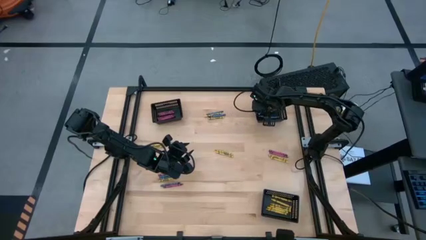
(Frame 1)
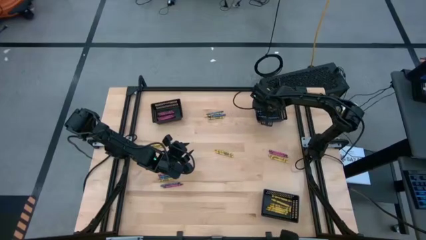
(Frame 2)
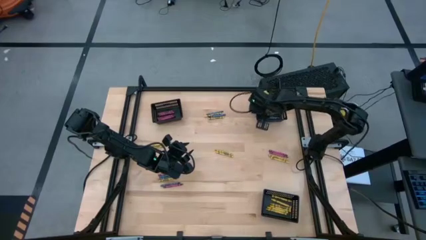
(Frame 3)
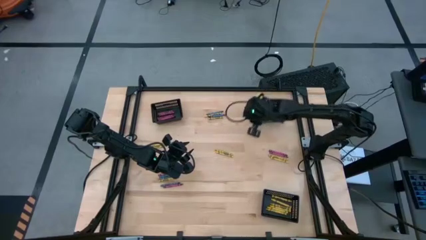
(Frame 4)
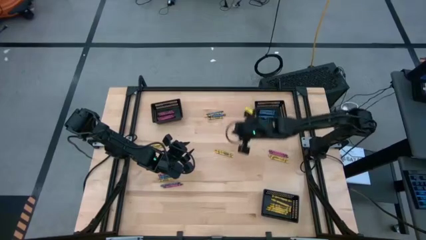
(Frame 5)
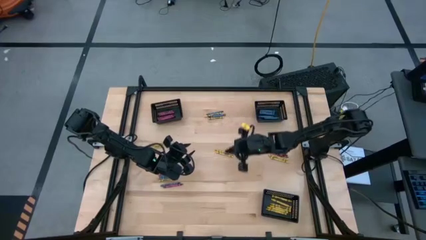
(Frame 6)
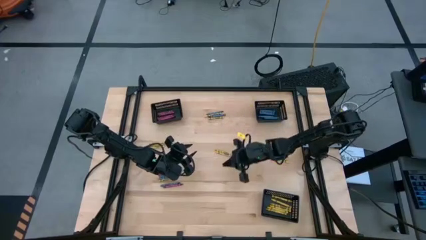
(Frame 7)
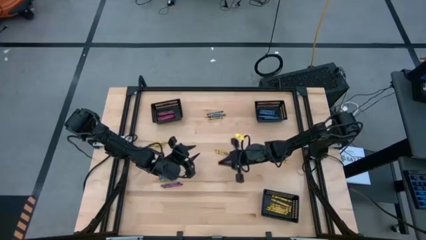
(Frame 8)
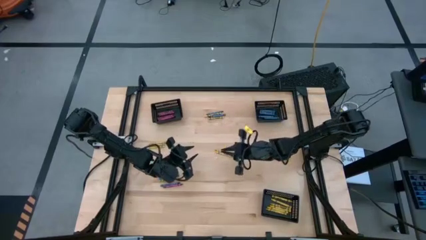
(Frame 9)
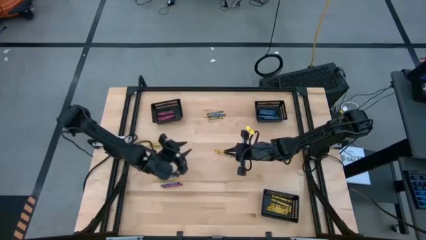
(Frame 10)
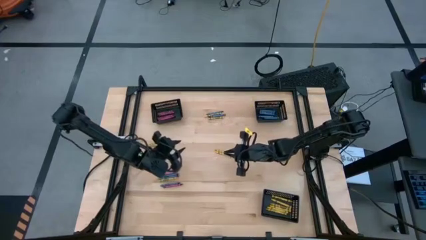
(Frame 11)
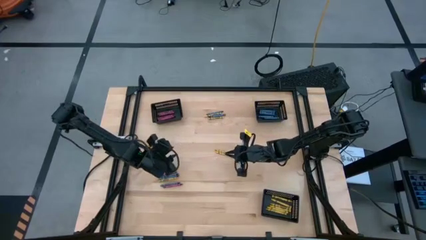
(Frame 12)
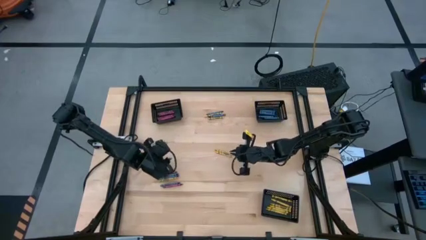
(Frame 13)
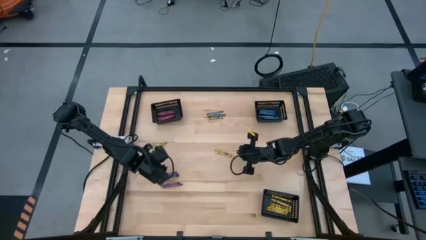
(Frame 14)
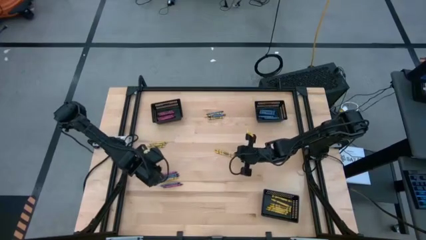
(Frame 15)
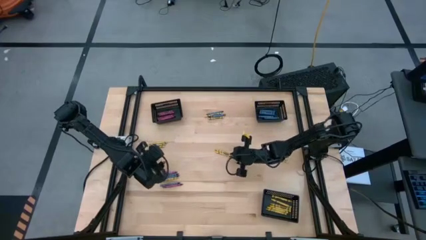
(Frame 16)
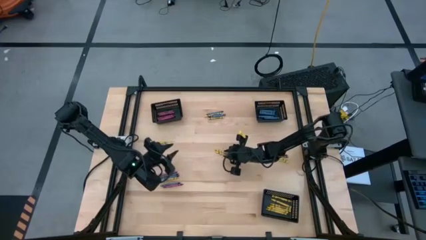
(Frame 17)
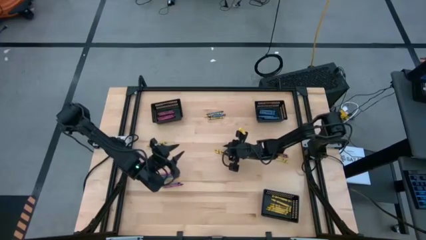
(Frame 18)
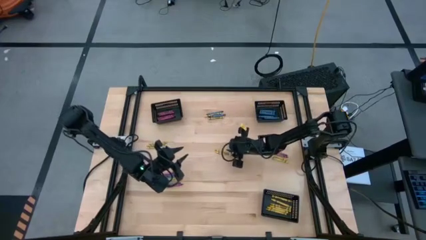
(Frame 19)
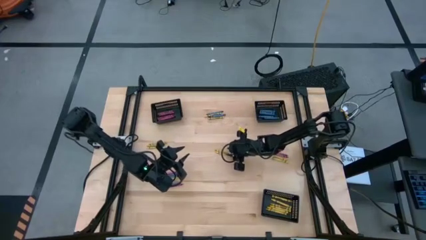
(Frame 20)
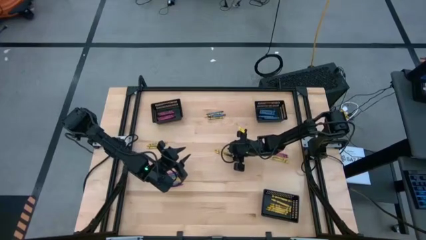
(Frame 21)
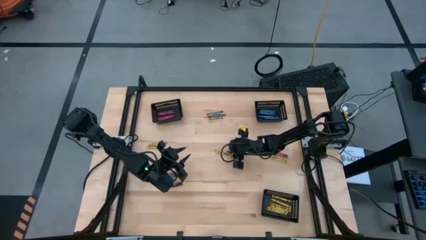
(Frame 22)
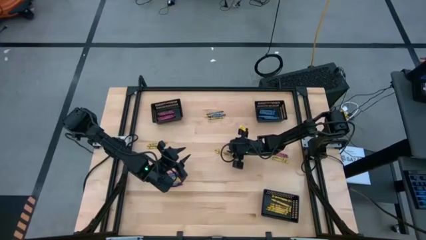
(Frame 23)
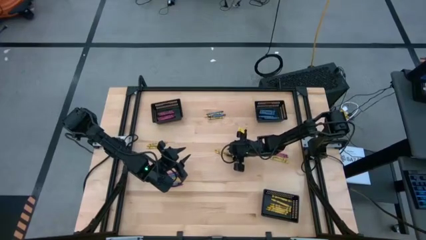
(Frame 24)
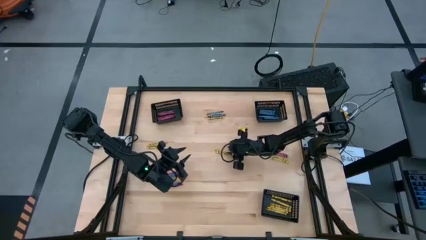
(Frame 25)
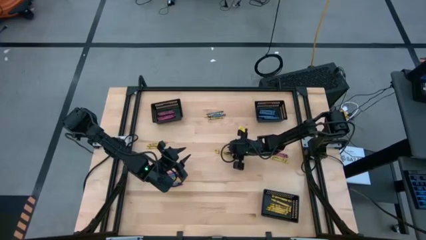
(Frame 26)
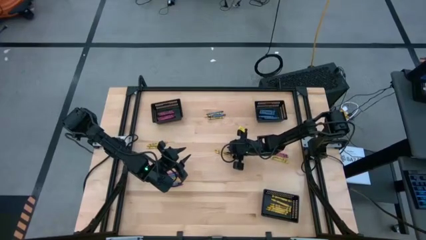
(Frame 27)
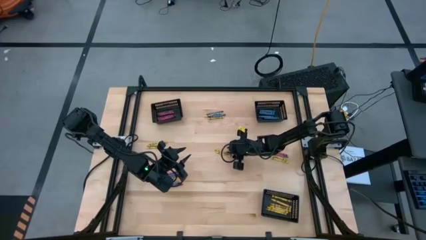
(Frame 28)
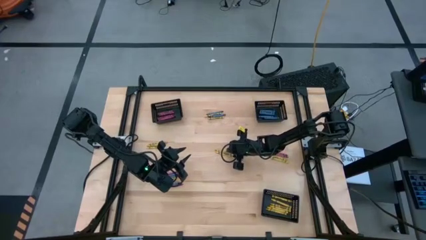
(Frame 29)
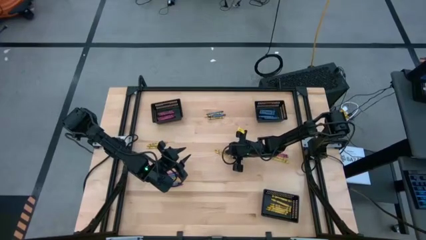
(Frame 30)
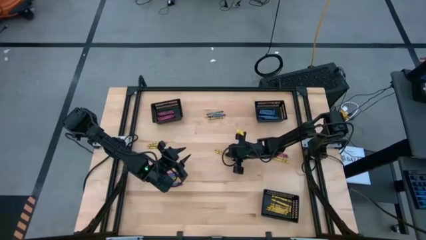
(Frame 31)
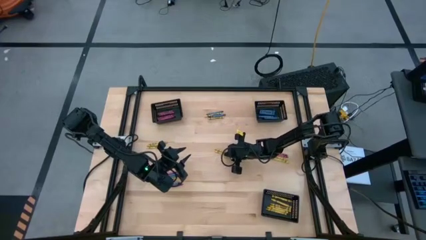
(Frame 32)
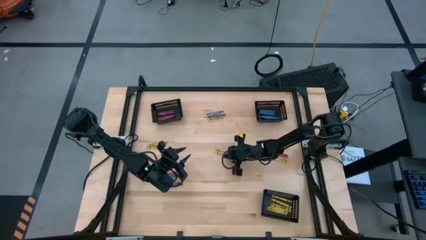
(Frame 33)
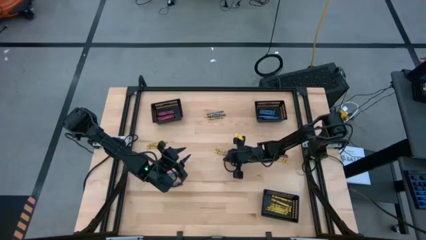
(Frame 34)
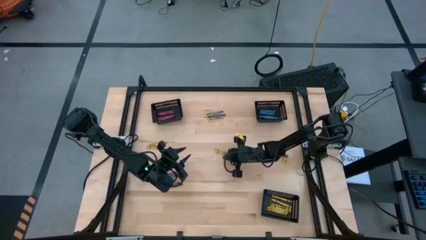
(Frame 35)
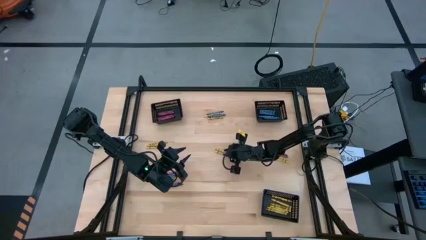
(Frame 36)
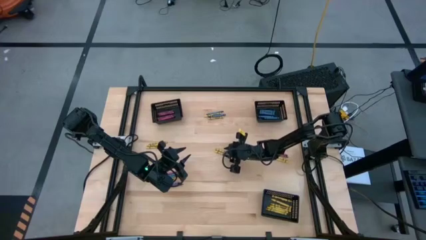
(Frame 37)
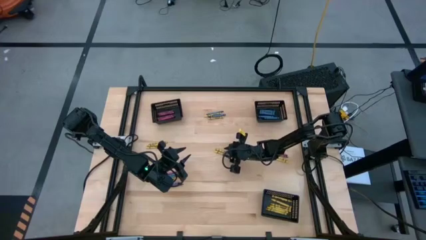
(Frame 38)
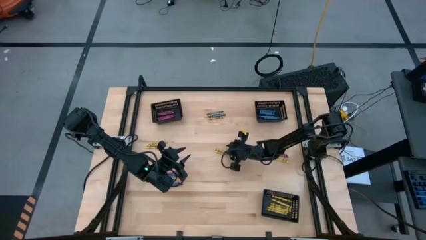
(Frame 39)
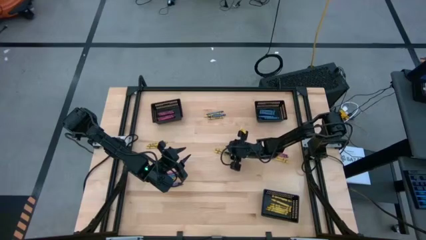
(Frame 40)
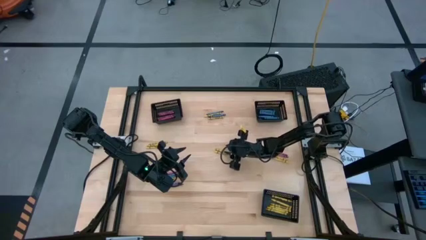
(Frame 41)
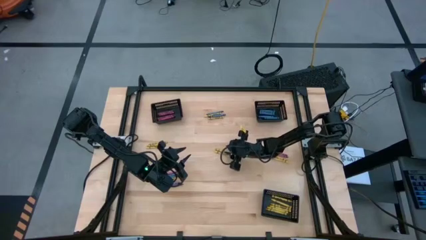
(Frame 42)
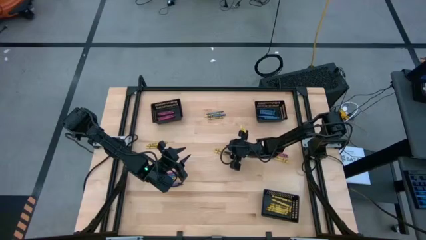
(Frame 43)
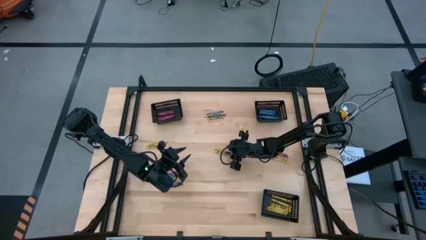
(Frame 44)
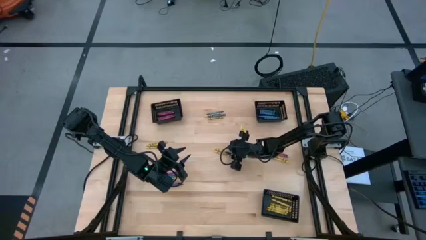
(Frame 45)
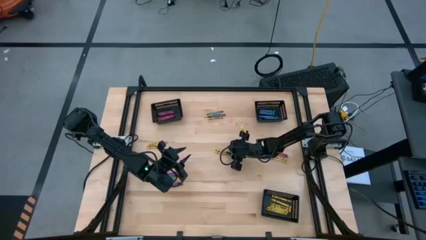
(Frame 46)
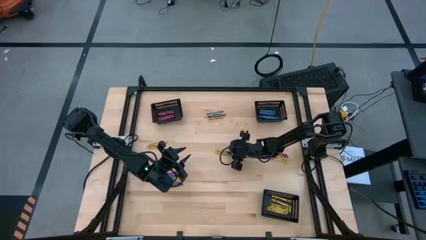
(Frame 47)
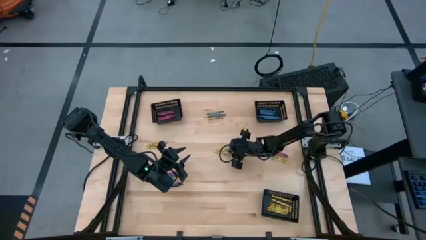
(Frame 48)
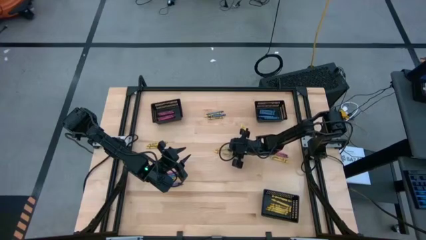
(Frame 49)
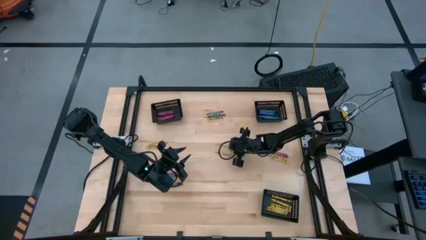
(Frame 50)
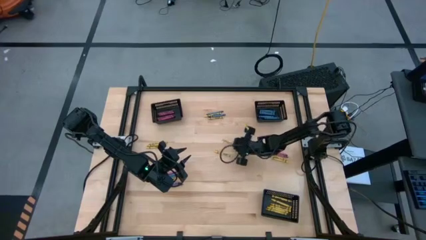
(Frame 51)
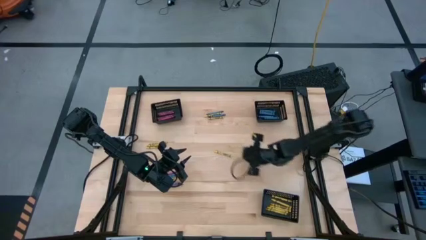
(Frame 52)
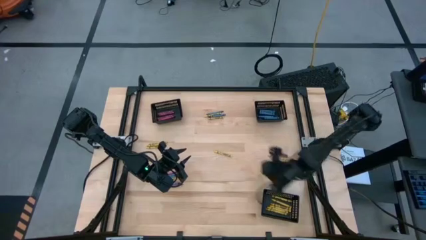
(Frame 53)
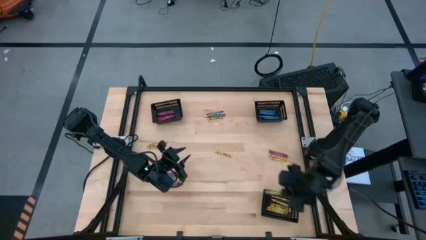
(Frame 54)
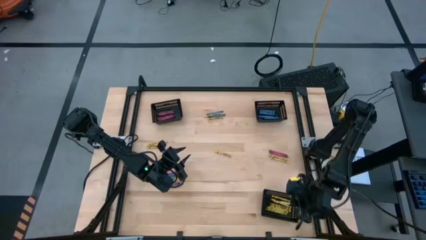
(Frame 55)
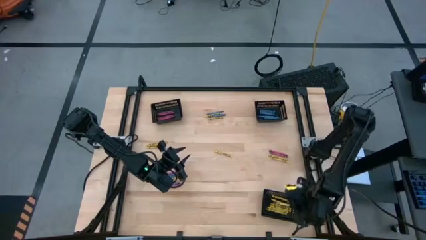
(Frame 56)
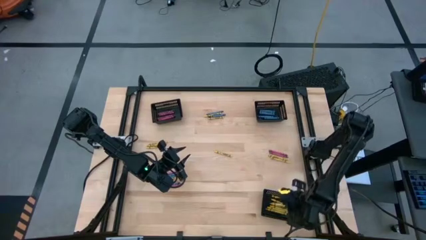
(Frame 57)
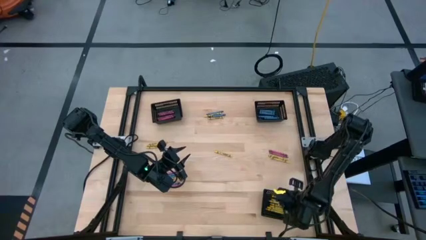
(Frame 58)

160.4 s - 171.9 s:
Task: Sort crayons
Put the yellow crayon into the bottom black bin
